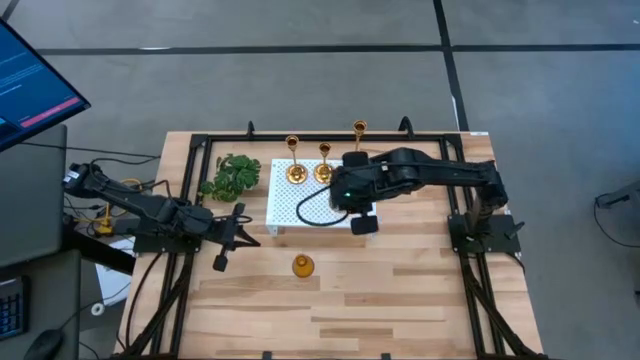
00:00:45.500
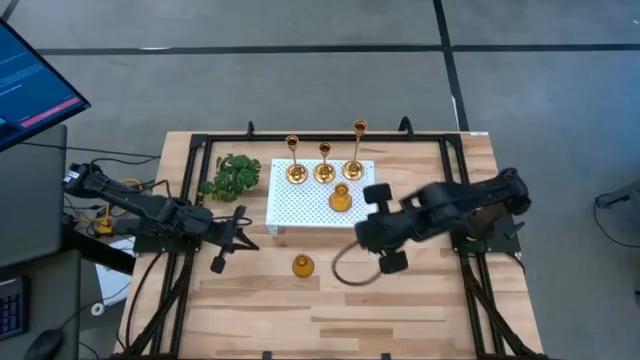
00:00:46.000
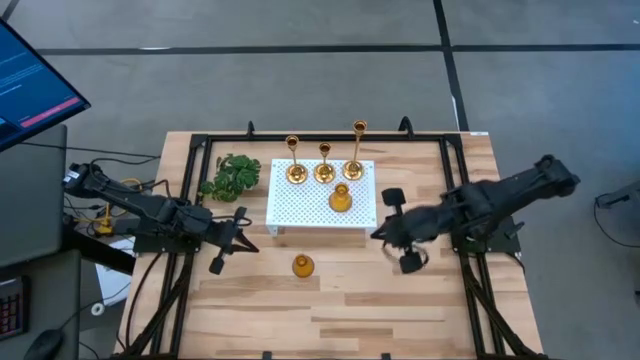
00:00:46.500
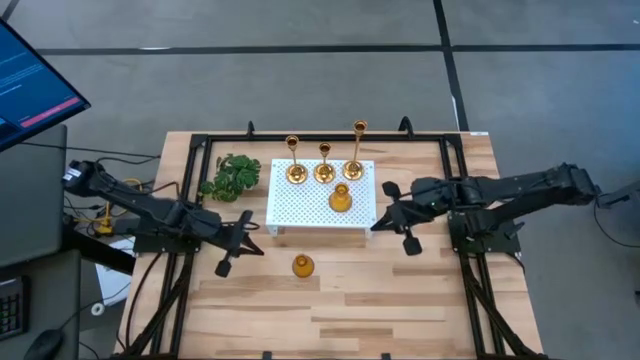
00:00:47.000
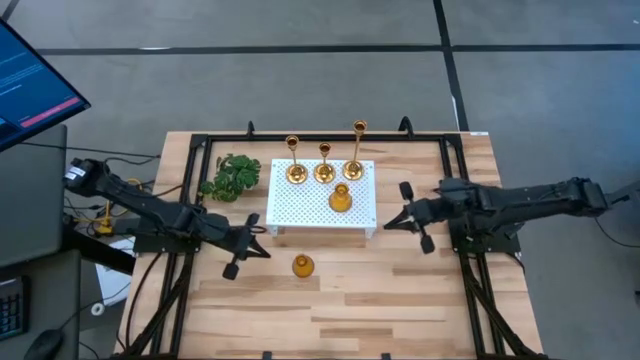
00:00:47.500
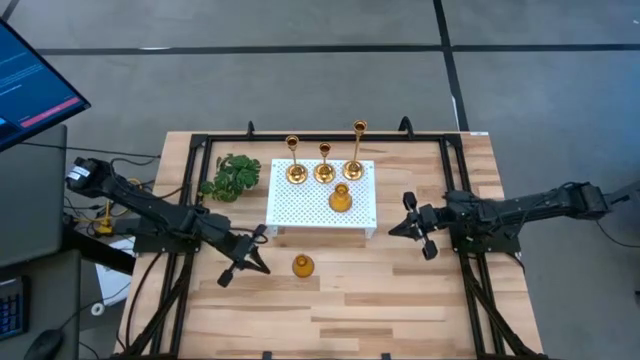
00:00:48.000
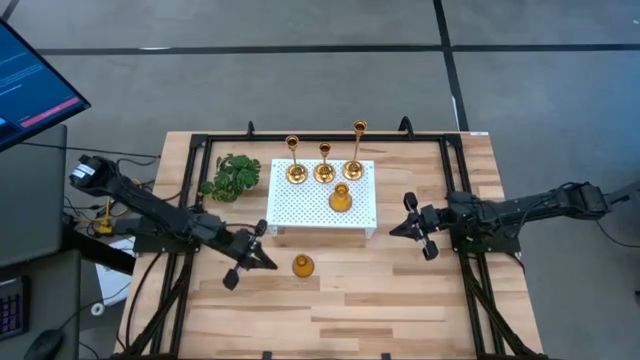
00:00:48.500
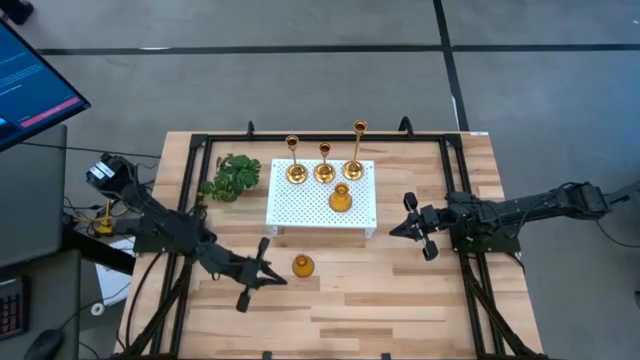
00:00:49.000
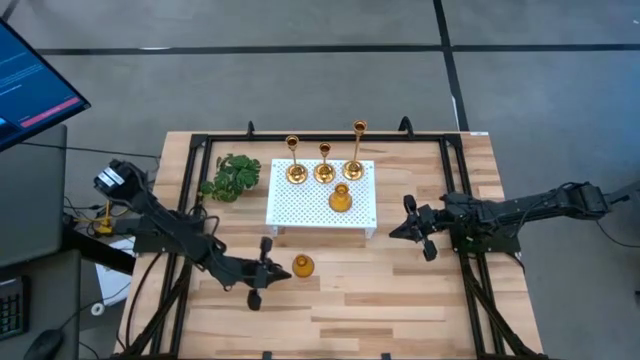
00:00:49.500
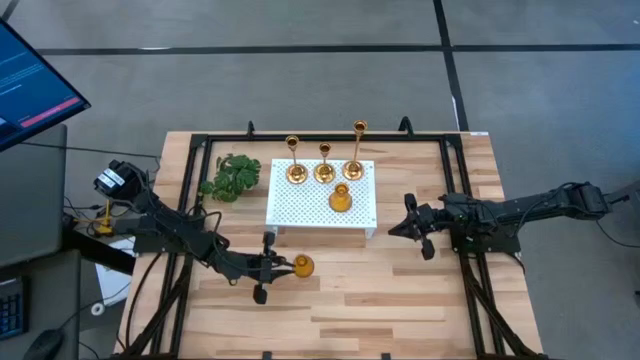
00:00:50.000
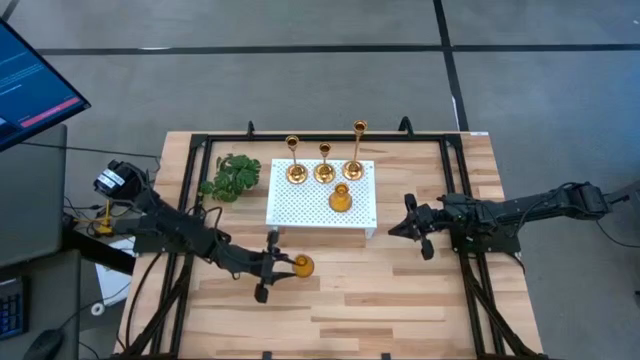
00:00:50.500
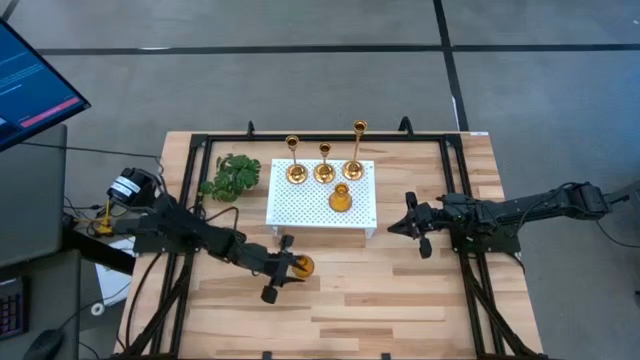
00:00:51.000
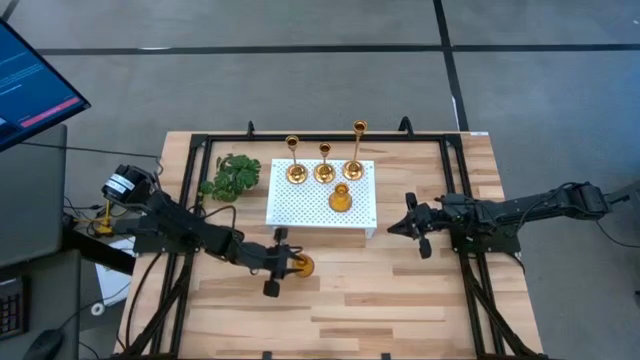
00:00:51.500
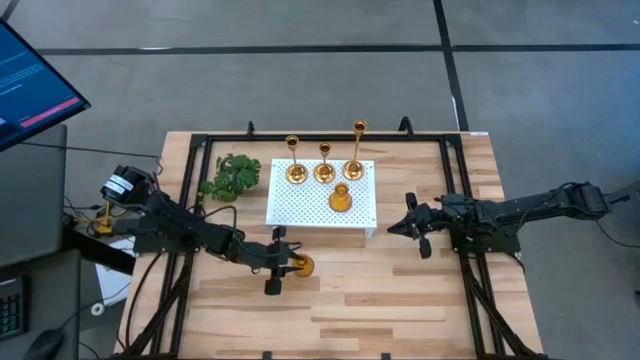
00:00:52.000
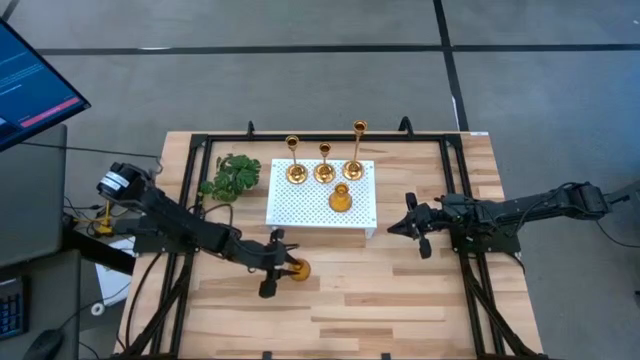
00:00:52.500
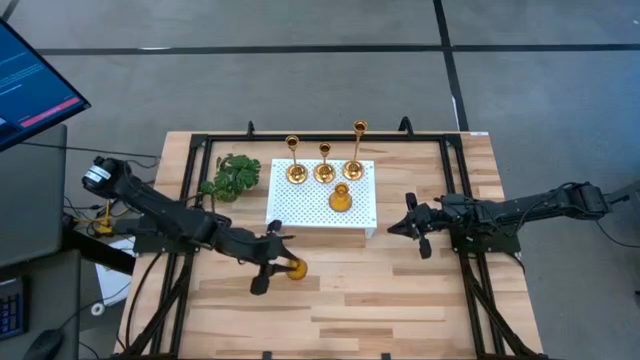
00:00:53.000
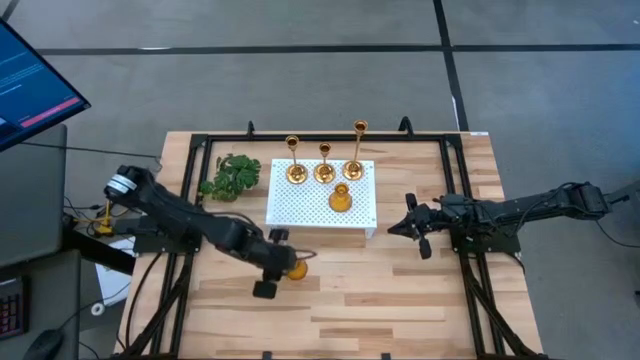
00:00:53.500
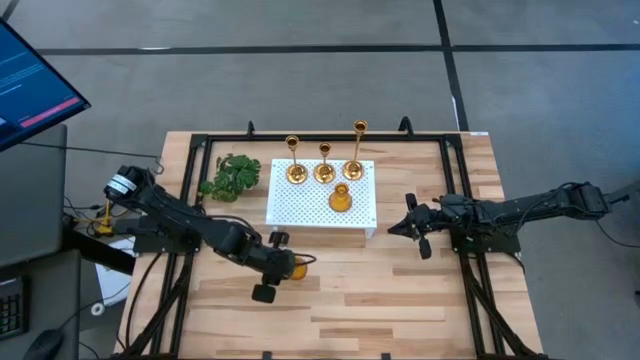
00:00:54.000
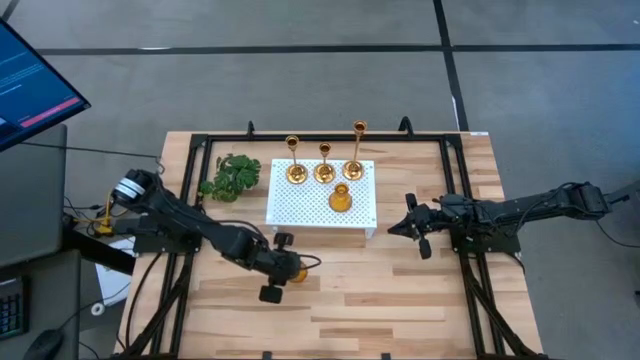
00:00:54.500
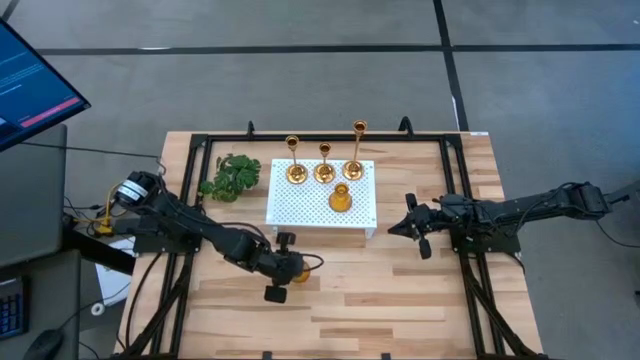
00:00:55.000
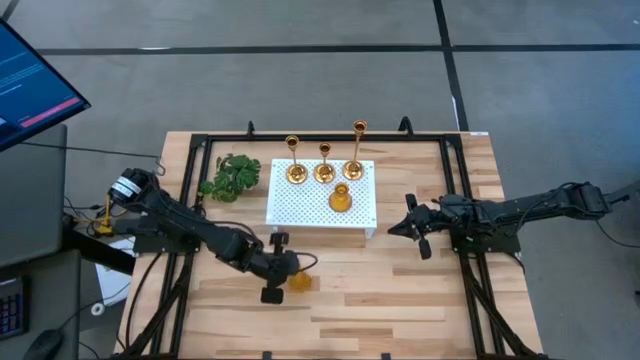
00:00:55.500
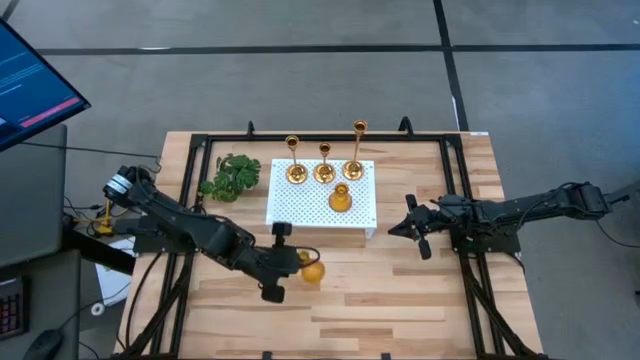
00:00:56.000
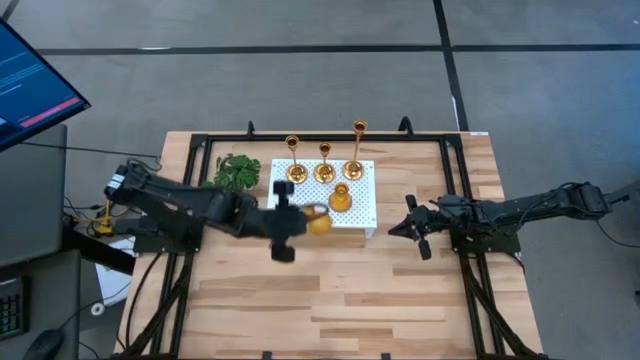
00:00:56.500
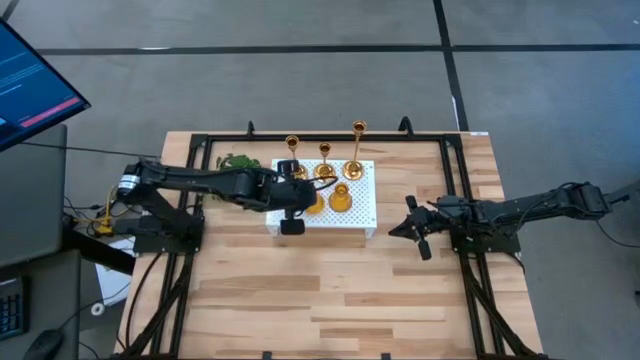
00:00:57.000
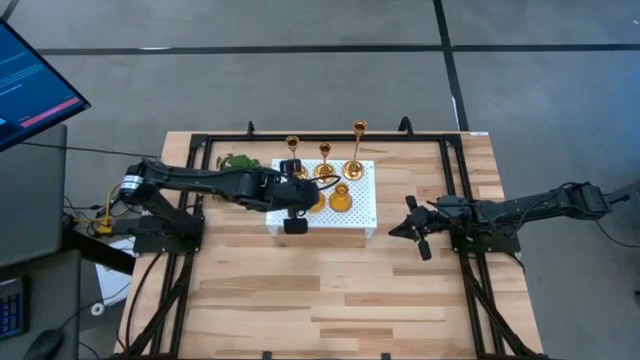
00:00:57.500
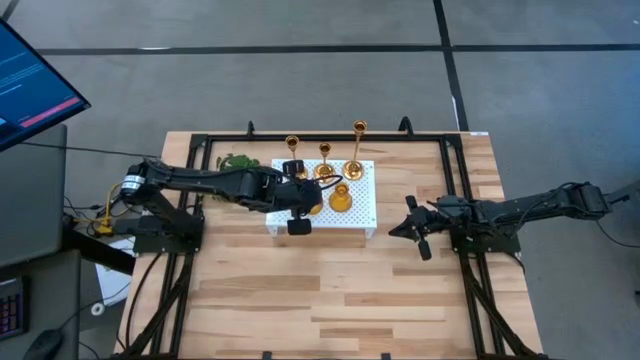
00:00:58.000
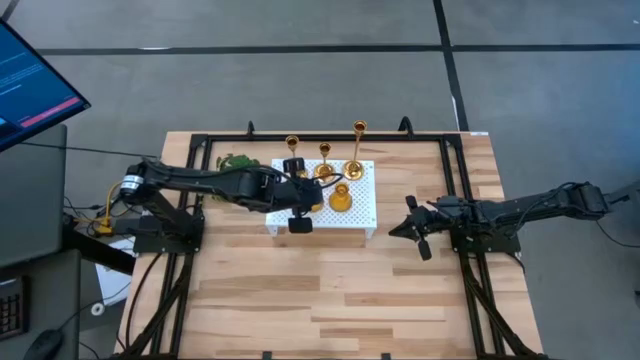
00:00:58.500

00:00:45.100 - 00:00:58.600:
Task: Pick & Place candle stick holders
Align the yellow candle holder on the shelf with the yellow candle holder

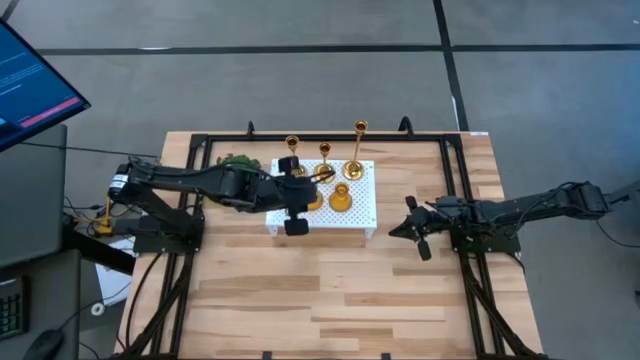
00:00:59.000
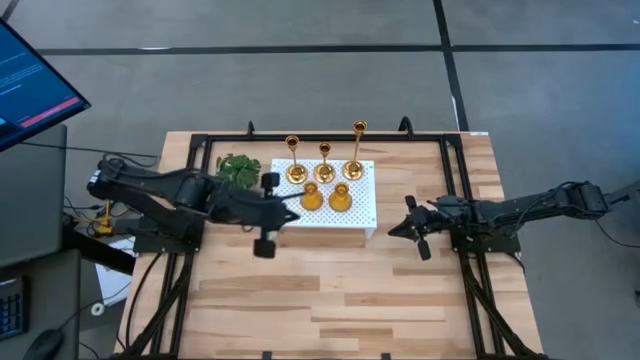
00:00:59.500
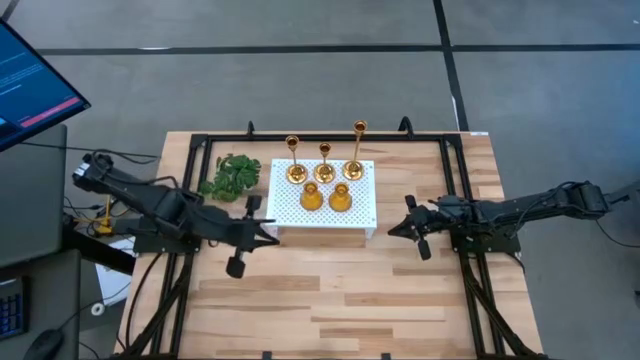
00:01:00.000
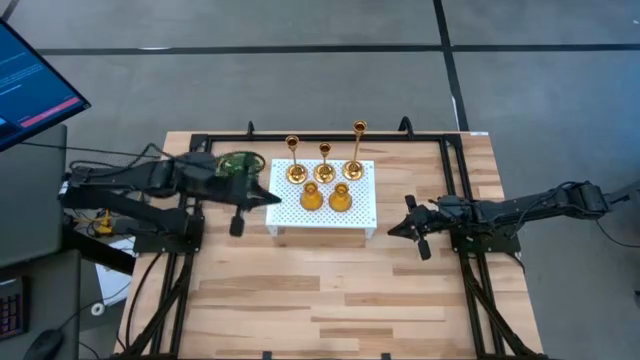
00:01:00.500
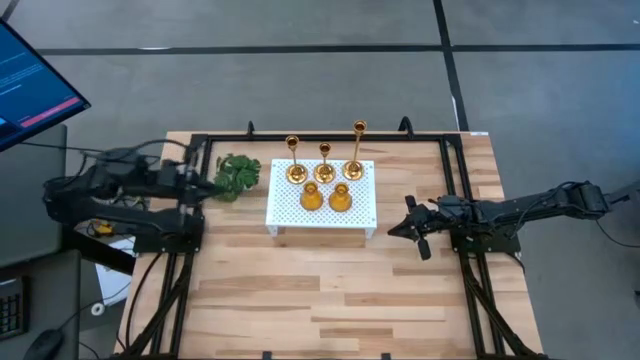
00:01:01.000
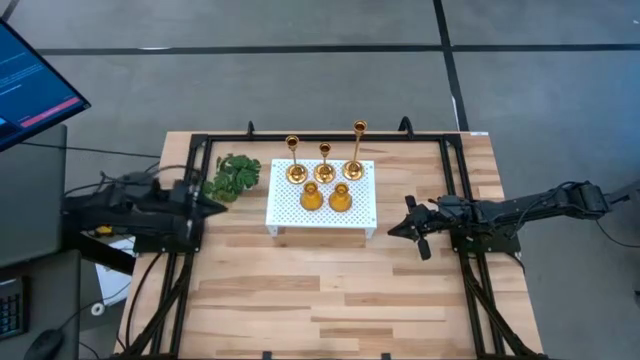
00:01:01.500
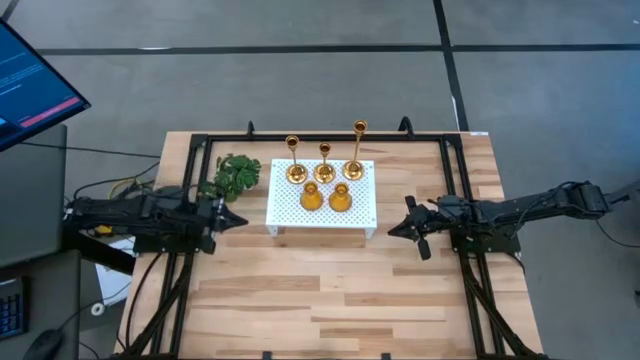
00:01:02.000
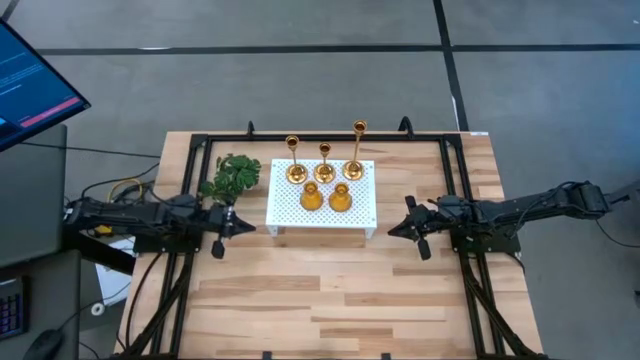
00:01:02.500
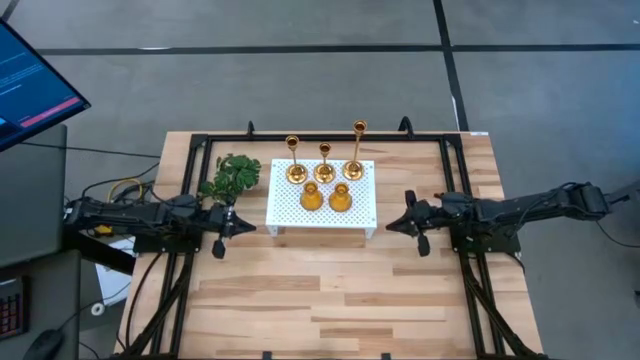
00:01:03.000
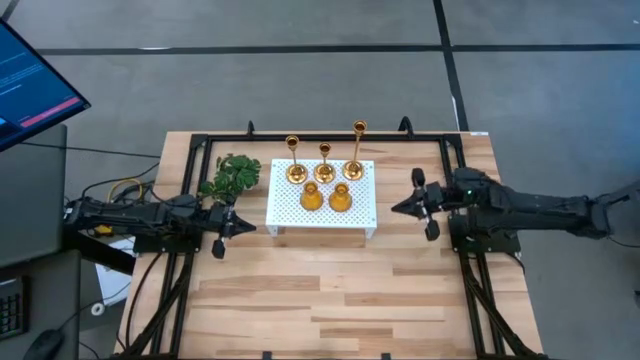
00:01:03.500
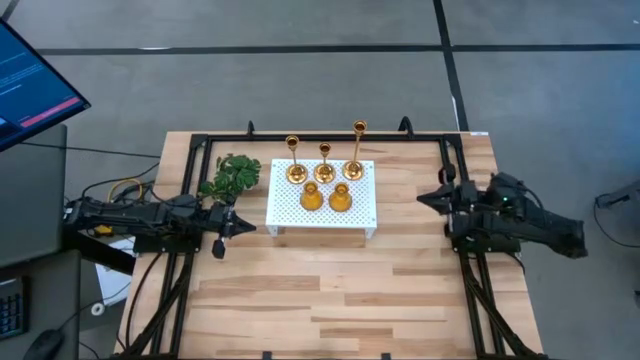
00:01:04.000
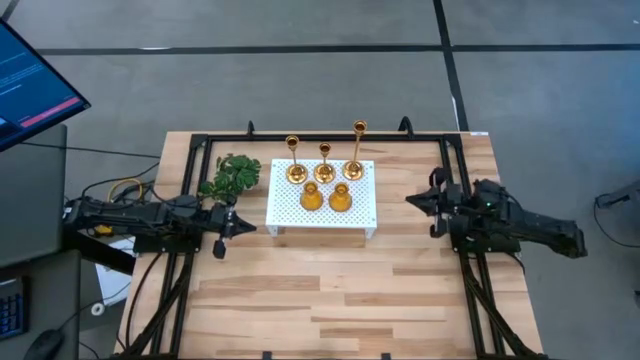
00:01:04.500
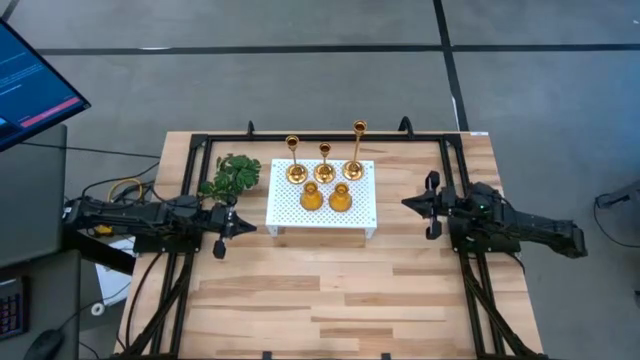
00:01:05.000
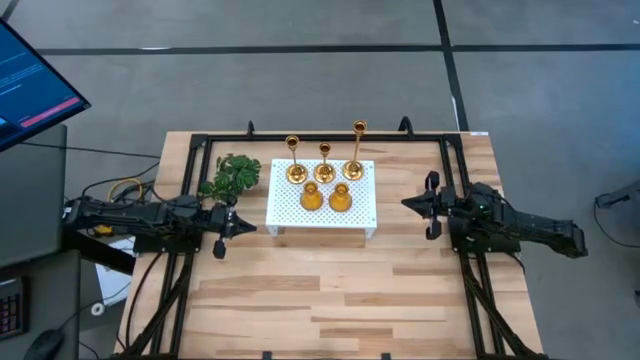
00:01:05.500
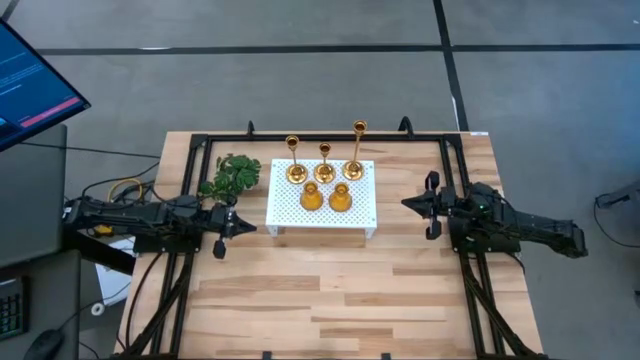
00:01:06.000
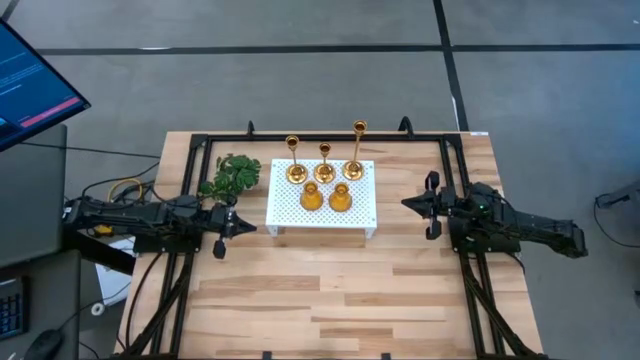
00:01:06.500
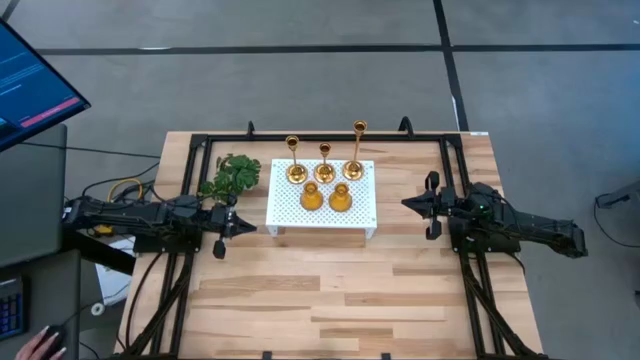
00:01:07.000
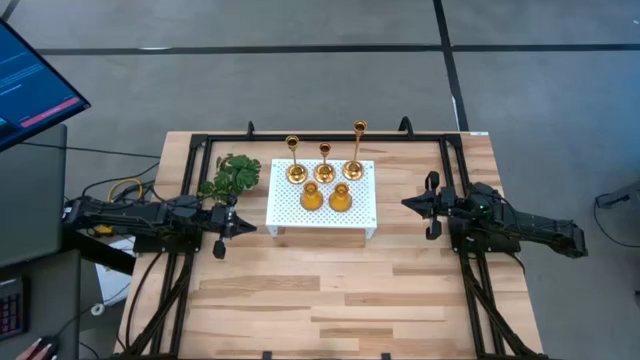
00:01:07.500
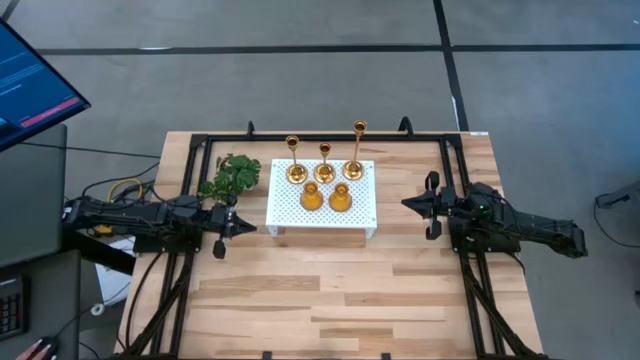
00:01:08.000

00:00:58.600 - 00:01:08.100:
Return to Home Position
